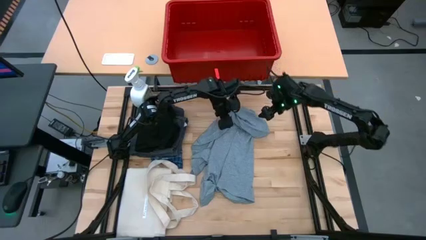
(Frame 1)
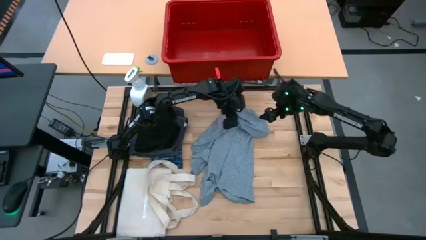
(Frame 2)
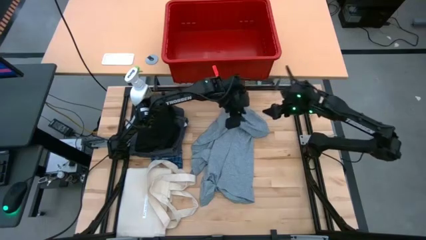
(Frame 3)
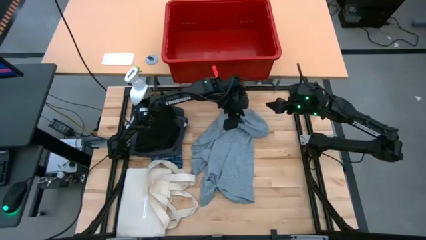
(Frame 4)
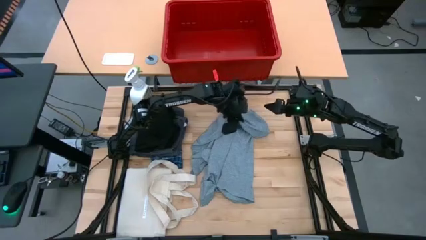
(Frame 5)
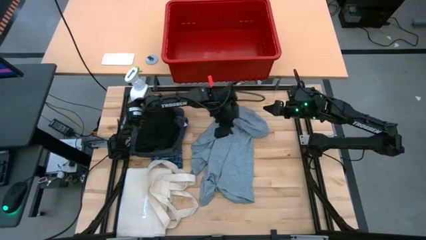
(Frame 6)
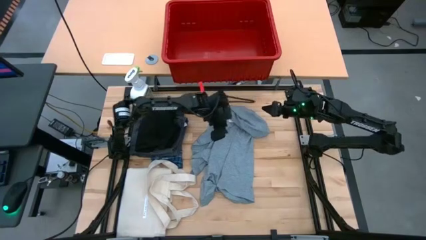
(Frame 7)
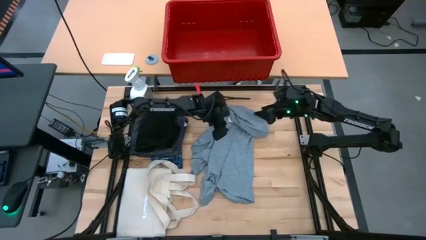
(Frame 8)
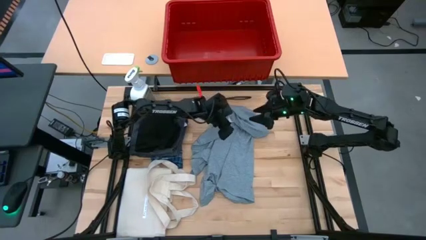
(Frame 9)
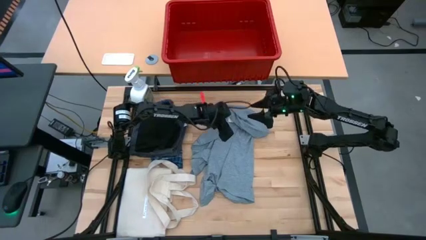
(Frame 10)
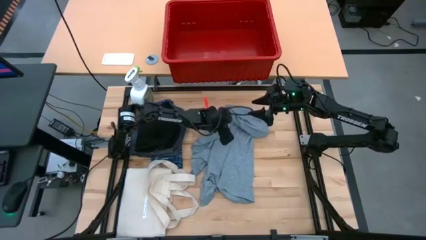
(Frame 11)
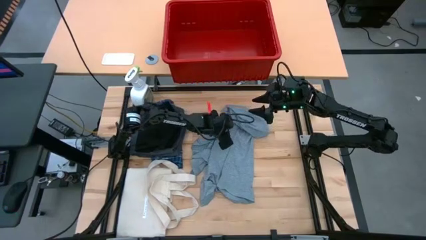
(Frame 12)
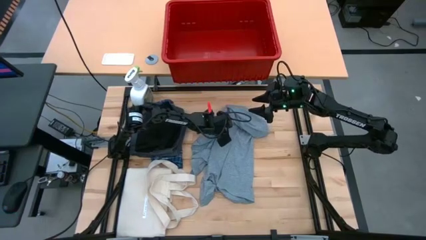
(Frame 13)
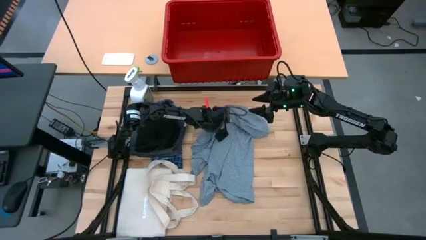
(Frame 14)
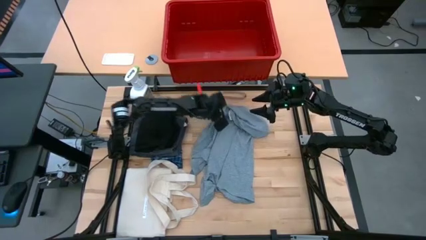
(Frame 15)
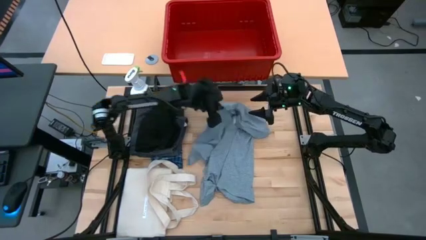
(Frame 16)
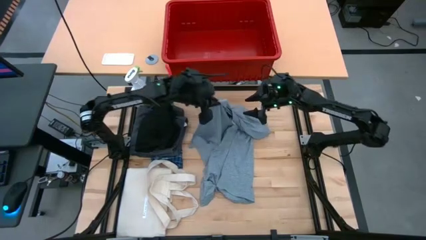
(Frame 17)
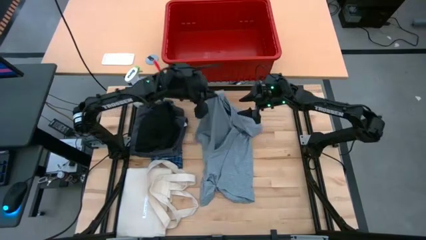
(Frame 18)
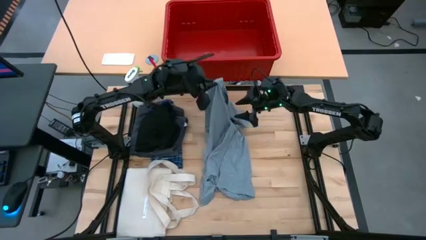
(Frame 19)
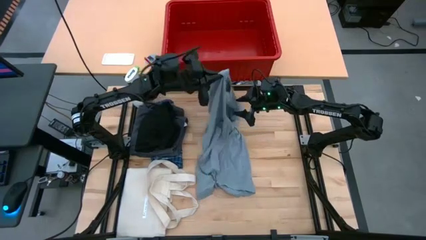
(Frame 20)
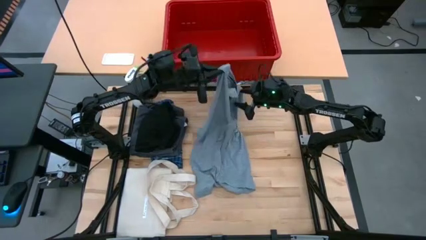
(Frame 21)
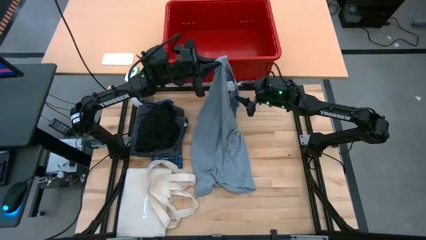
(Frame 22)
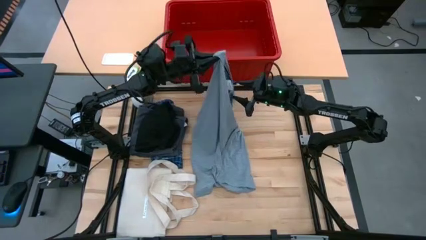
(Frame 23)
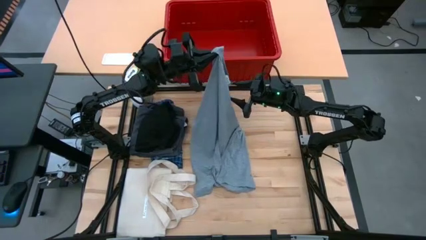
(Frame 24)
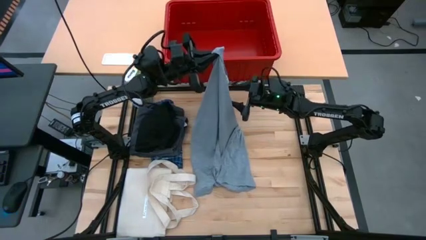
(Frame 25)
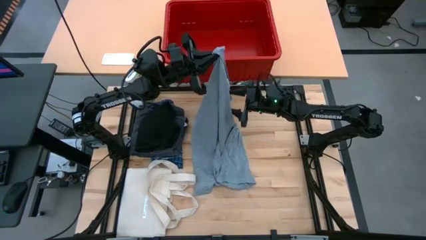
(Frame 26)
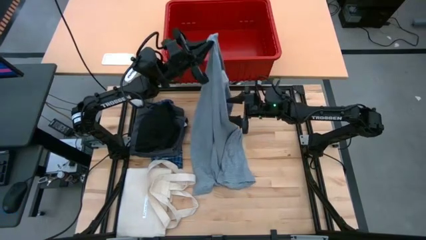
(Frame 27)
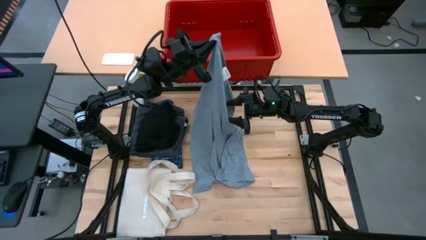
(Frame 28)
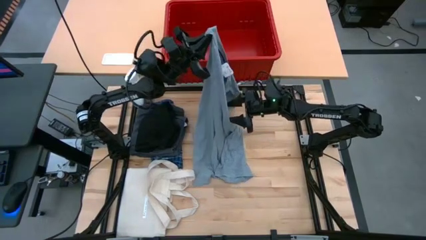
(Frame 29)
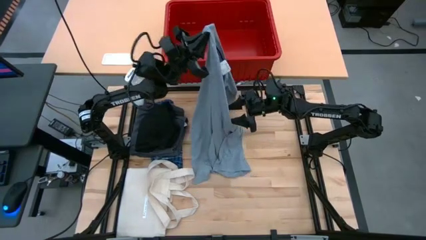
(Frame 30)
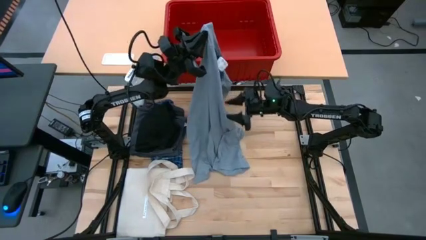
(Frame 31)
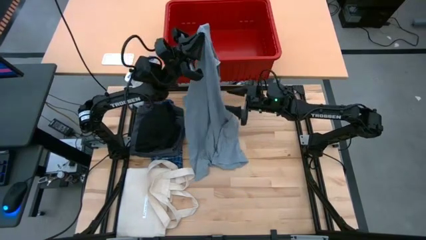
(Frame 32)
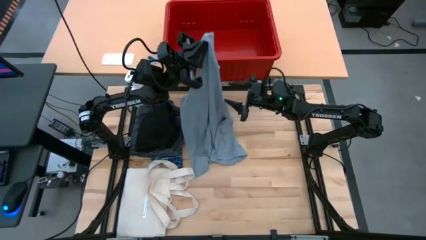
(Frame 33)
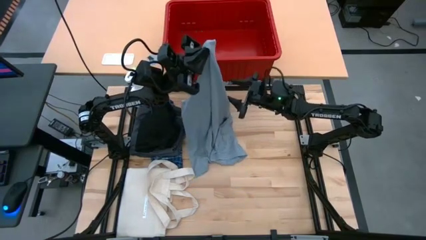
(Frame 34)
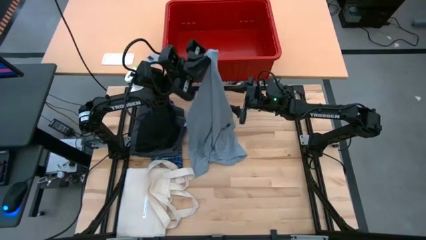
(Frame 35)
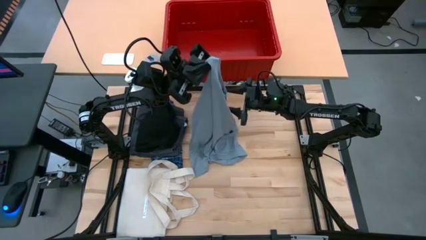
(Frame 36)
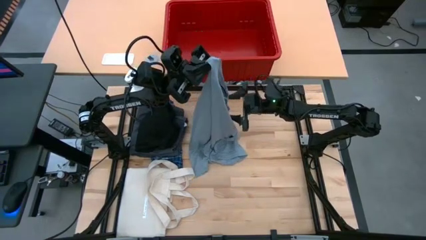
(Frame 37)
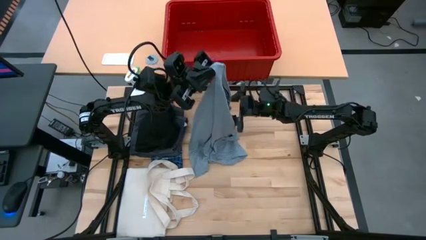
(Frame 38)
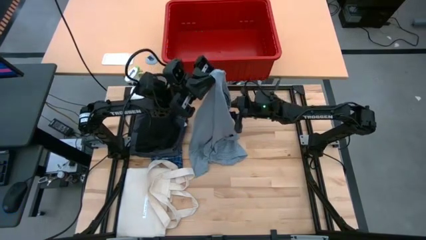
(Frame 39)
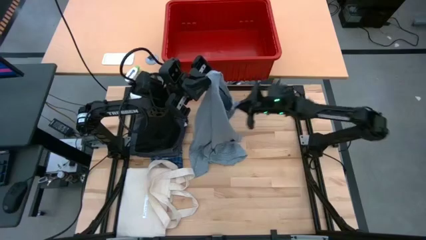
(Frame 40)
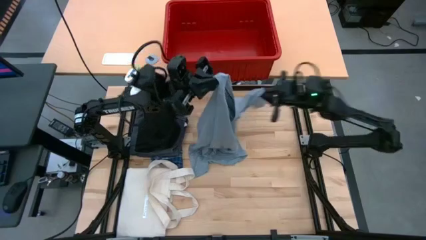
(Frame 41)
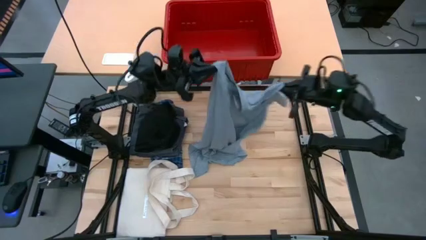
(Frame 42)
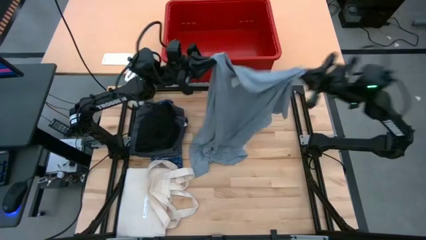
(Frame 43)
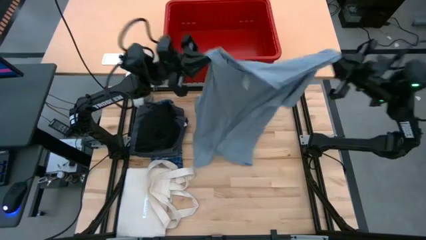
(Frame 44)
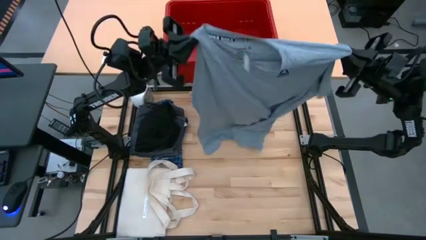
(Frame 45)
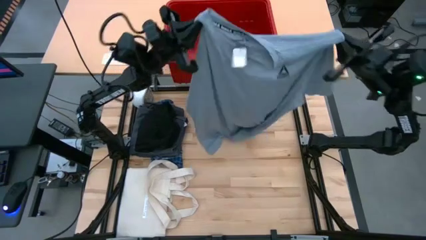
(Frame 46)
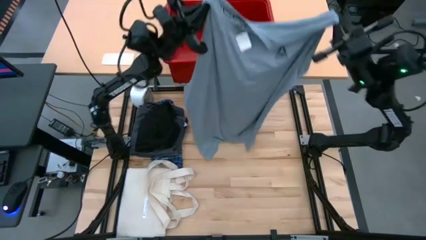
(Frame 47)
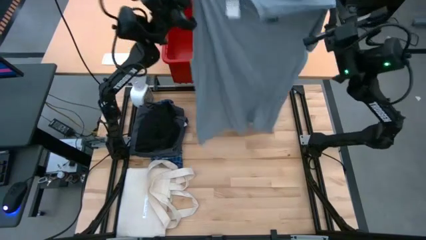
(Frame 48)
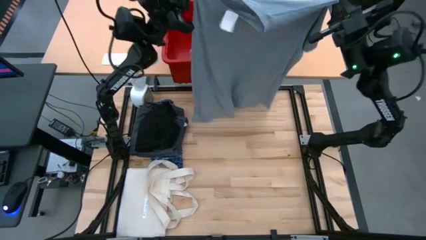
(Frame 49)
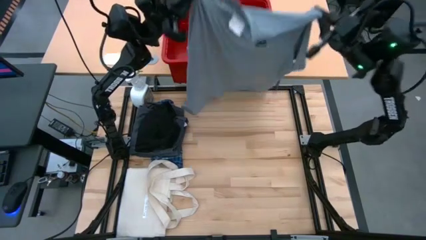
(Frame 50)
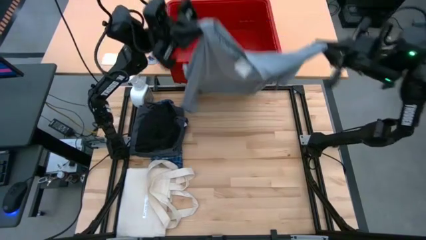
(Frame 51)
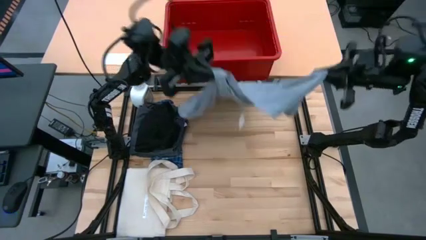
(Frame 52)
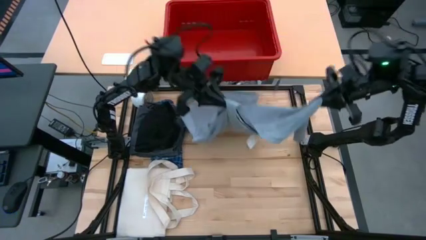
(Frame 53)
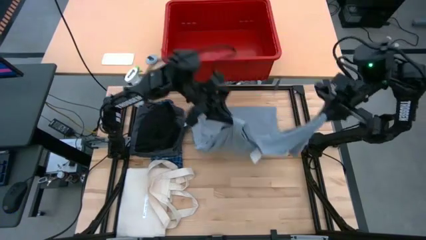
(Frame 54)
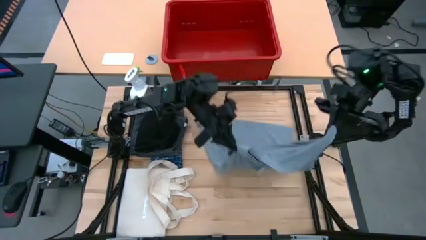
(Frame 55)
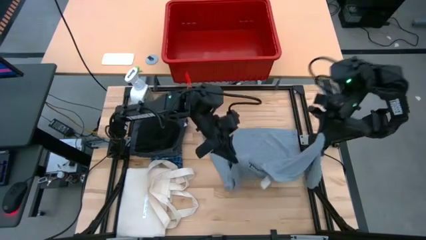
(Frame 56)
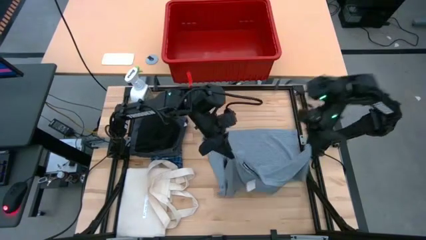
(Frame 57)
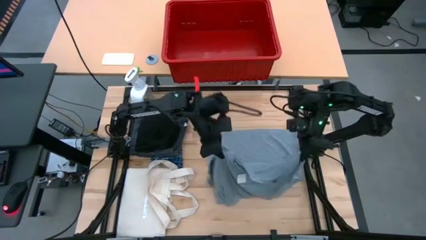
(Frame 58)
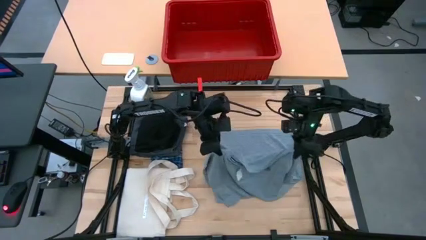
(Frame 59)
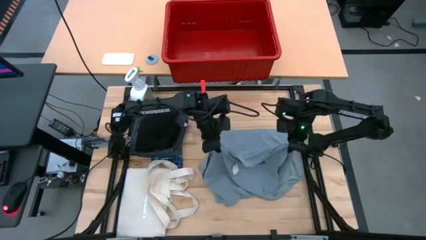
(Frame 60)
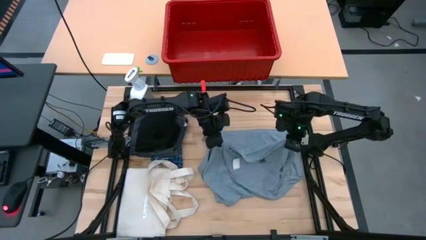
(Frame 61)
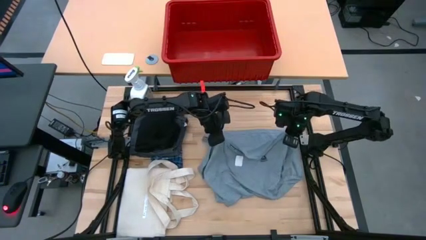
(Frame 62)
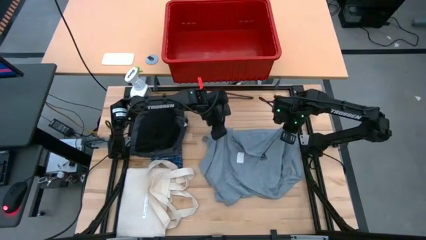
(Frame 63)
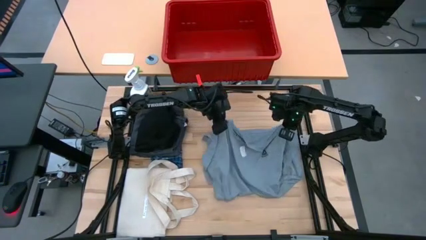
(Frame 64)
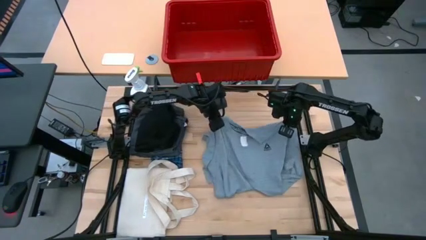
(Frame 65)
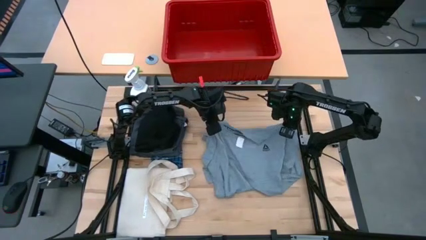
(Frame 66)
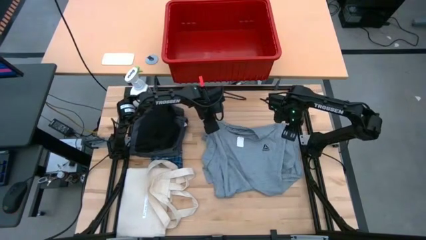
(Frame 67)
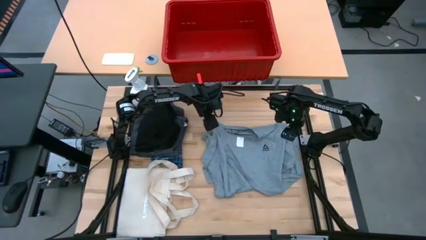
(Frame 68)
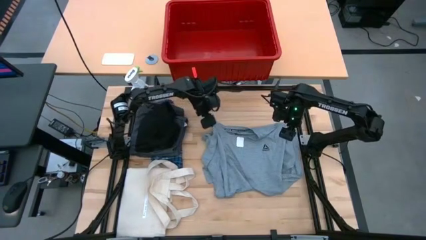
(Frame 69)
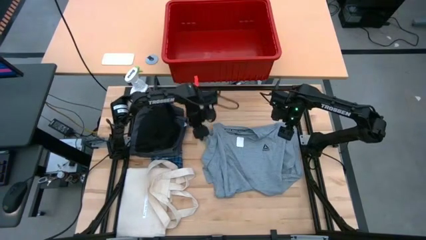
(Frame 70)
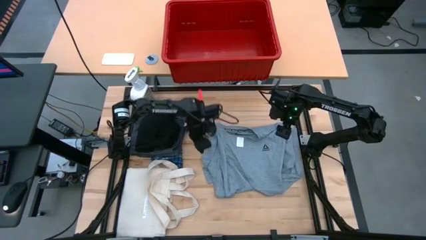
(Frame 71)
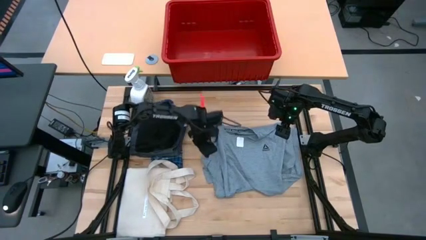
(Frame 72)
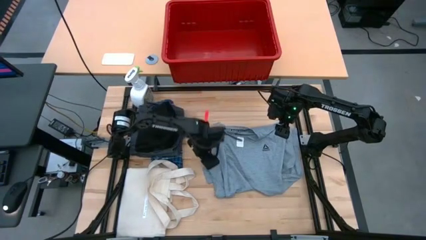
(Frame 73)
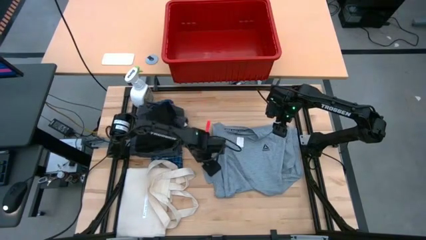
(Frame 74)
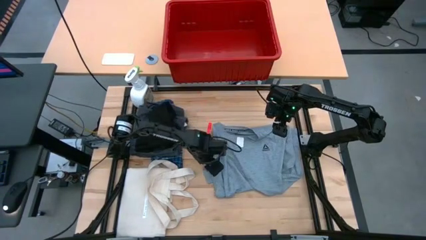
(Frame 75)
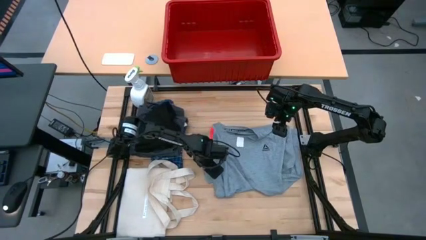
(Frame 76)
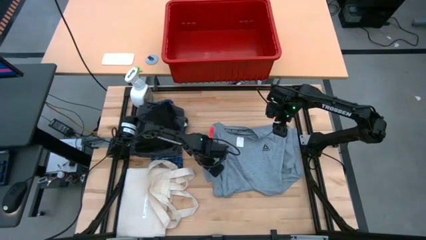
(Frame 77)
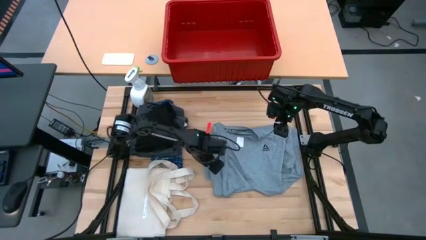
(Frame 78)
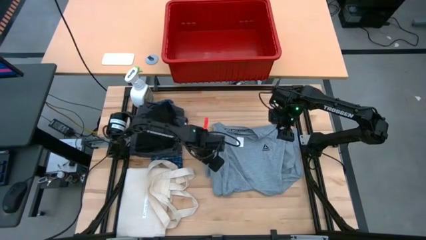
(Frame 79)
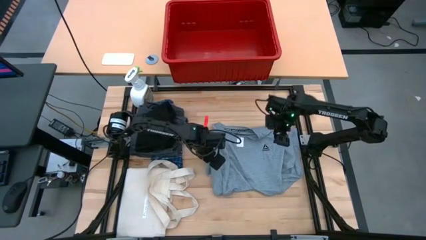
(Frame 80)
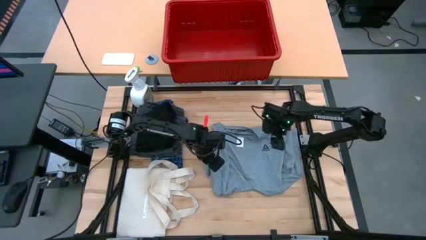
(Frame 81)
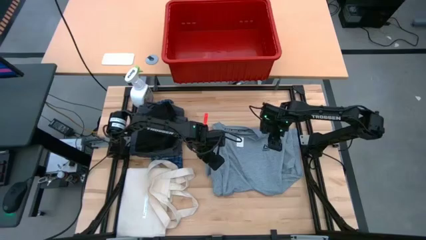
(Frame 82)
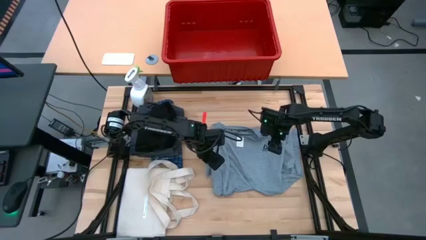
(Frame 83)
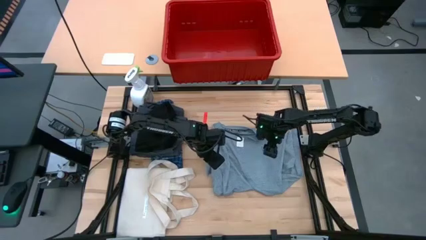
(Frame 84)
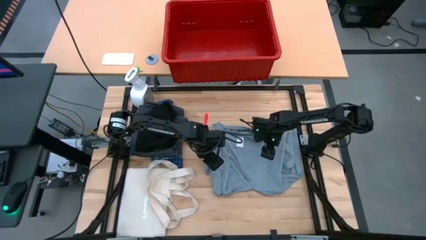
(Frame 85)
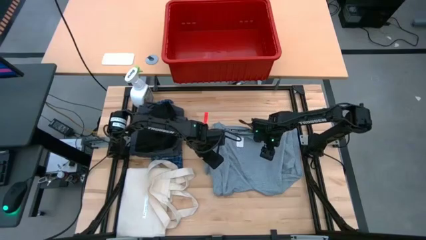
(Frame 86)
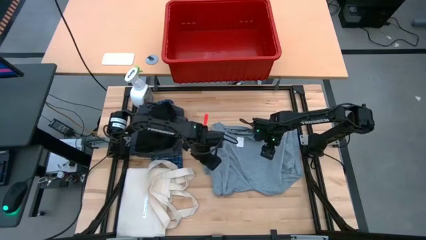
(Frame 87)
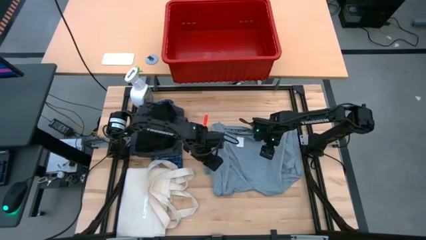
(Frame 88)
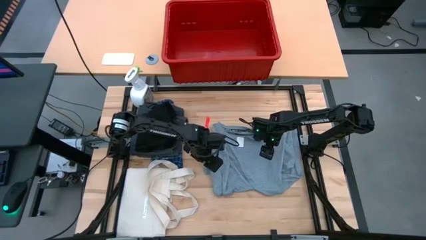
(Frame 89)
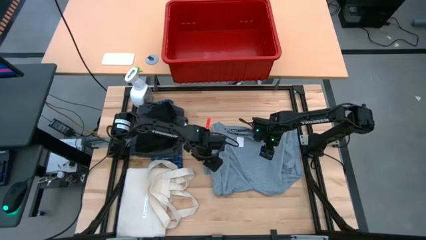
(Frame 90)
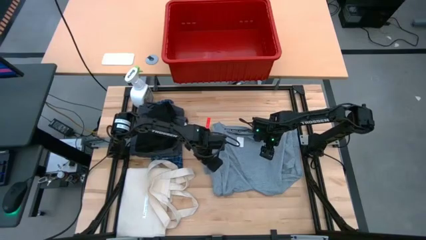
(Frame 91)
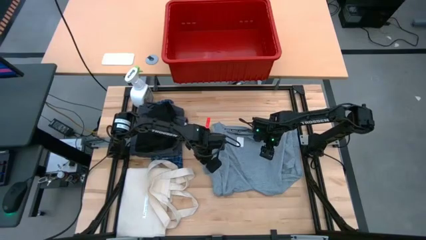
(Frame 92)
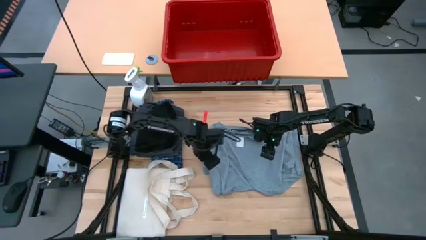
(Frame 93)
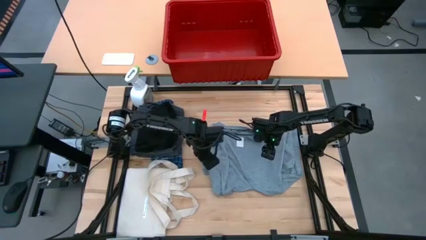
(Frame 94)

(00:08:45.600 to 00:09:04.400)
Task: Fold Laundry from Bin
Fold the gray shirt
